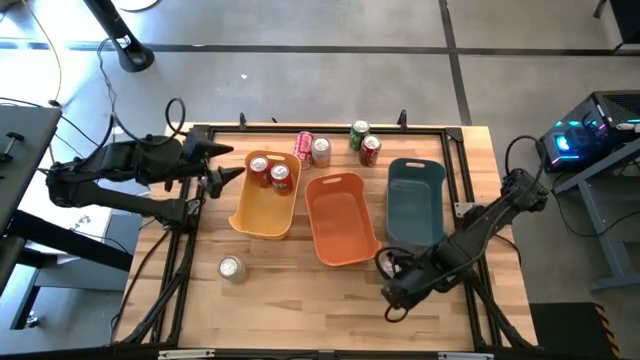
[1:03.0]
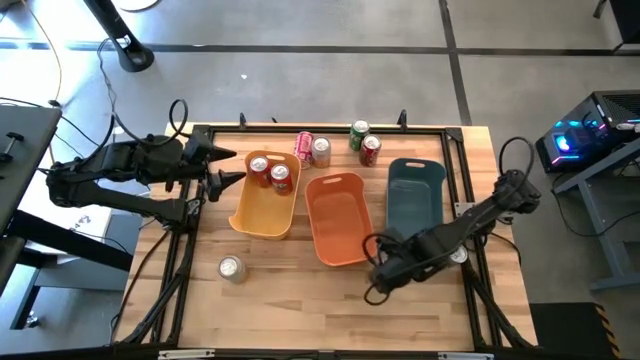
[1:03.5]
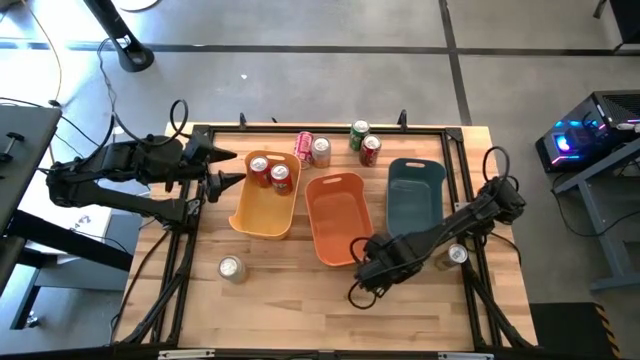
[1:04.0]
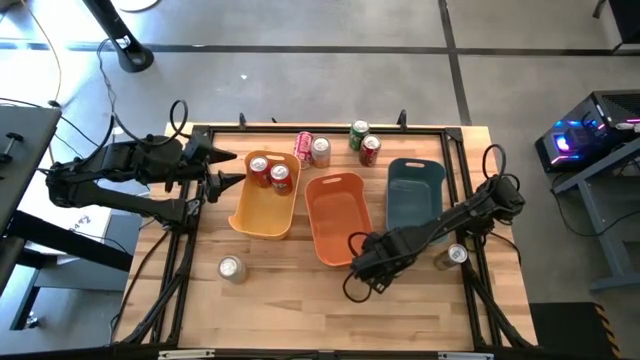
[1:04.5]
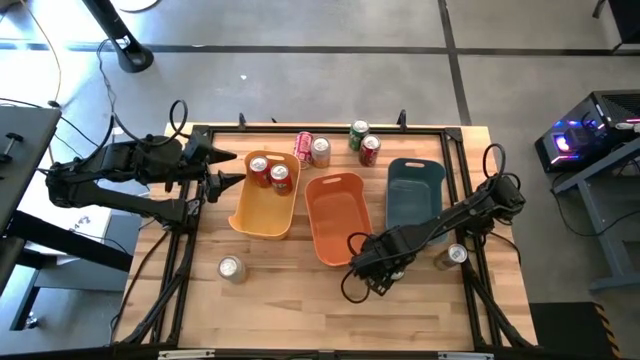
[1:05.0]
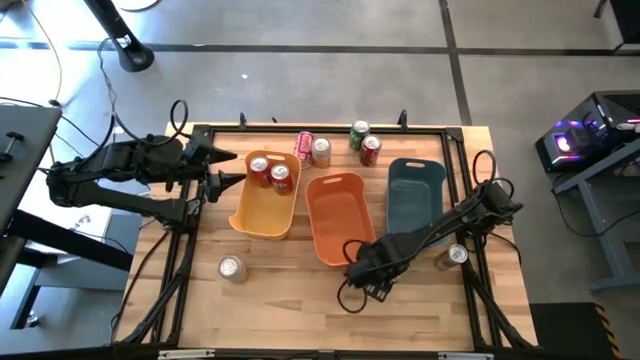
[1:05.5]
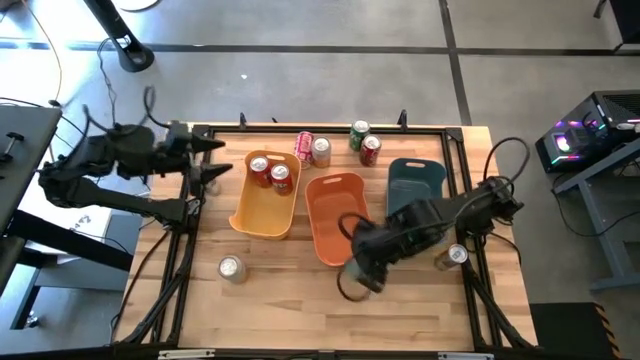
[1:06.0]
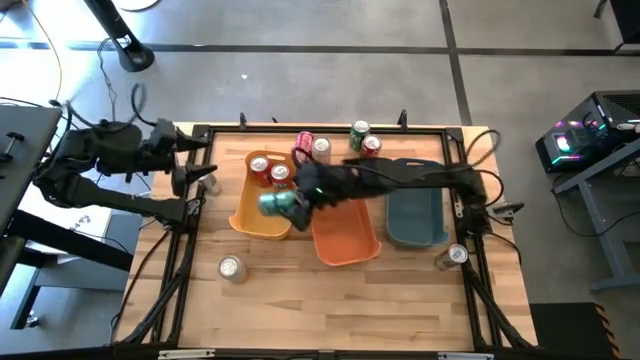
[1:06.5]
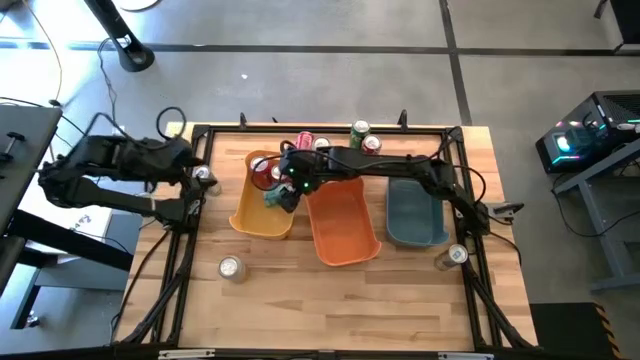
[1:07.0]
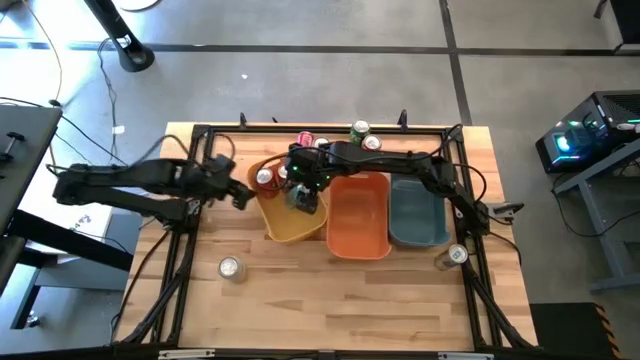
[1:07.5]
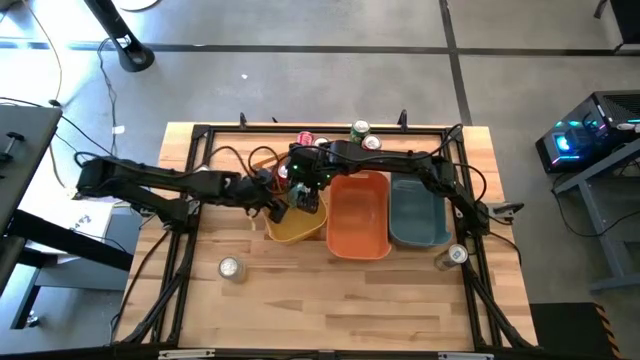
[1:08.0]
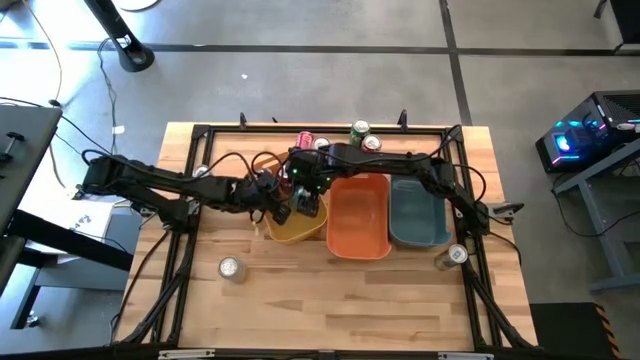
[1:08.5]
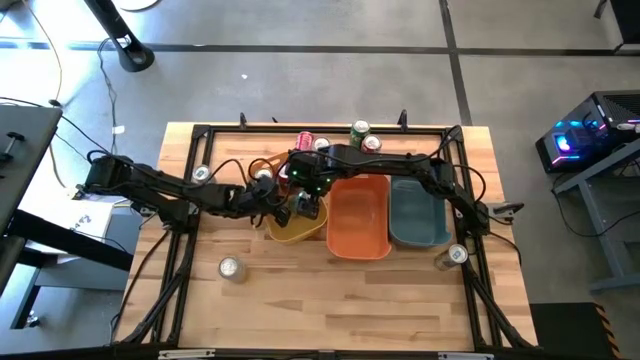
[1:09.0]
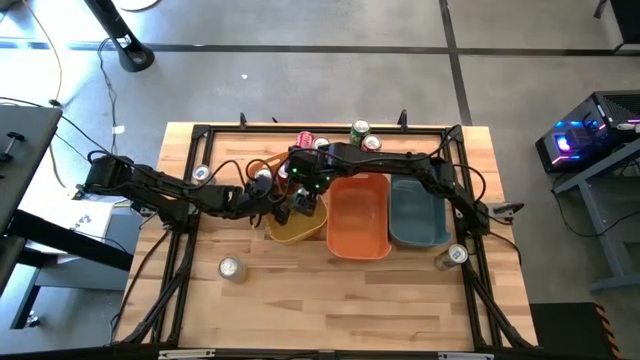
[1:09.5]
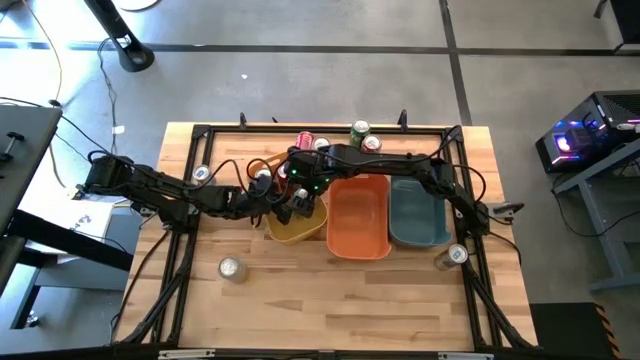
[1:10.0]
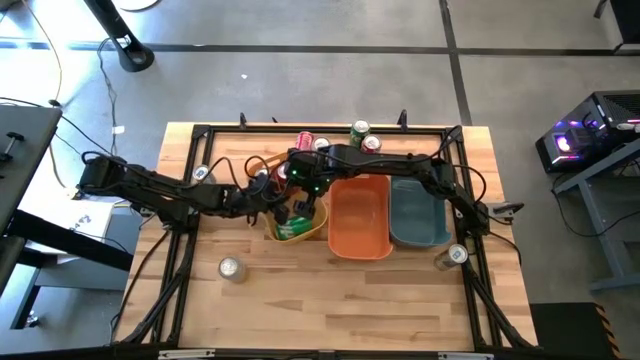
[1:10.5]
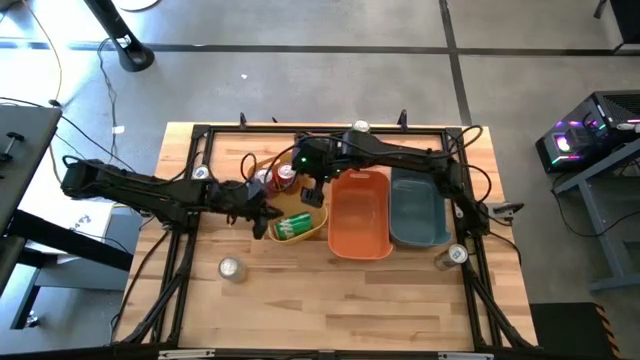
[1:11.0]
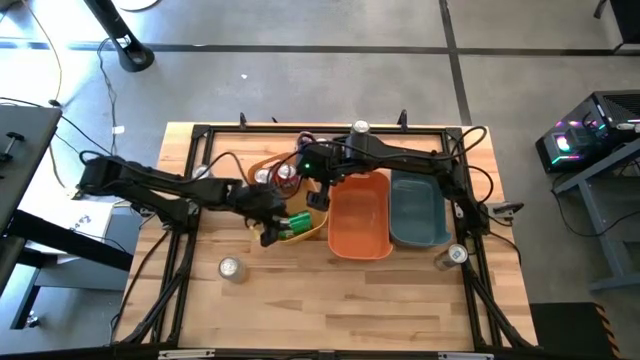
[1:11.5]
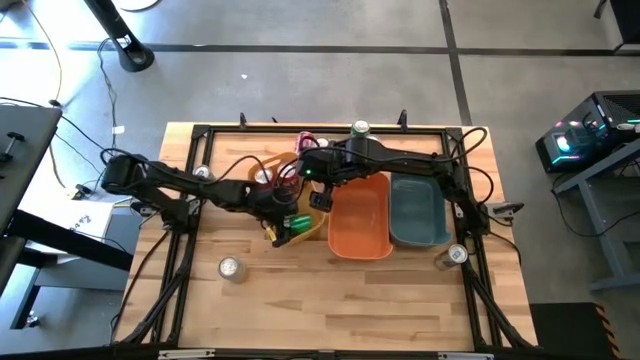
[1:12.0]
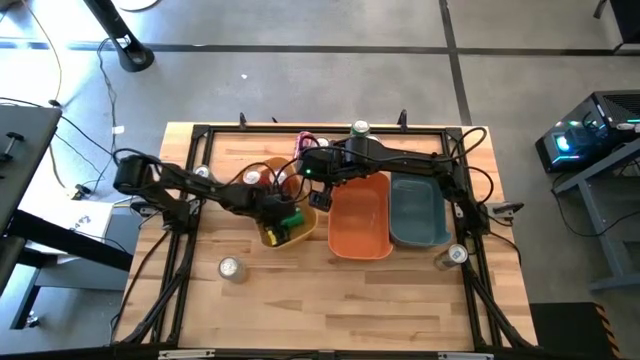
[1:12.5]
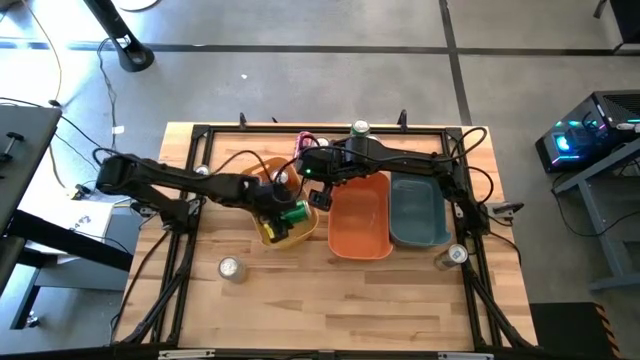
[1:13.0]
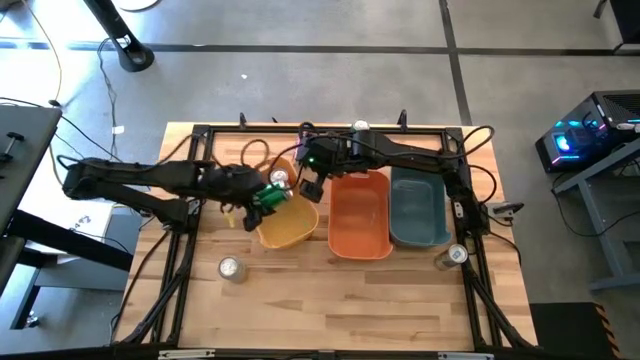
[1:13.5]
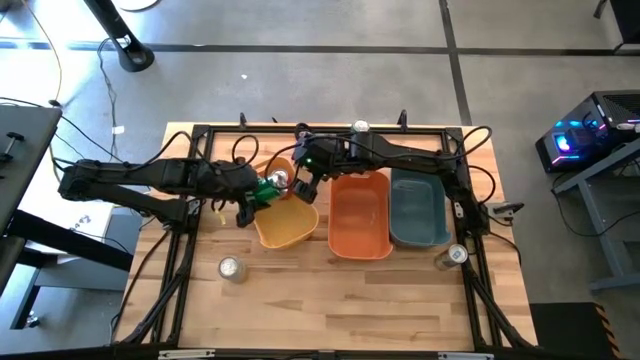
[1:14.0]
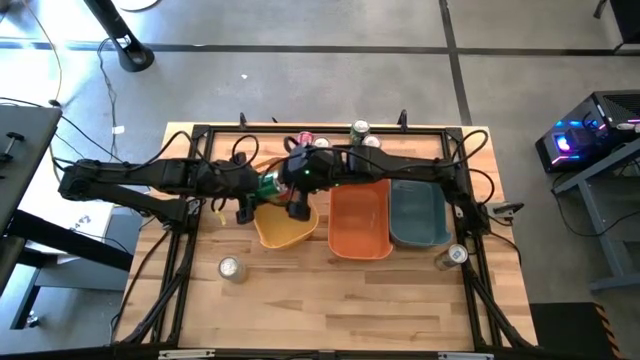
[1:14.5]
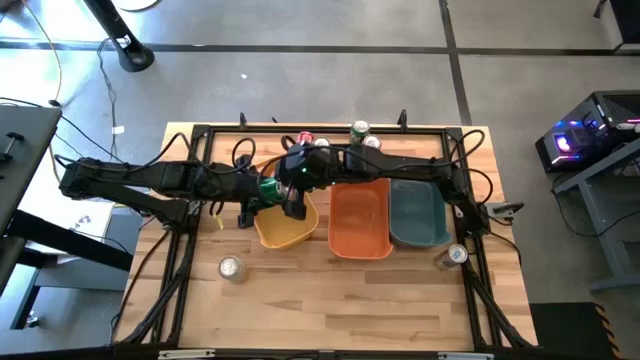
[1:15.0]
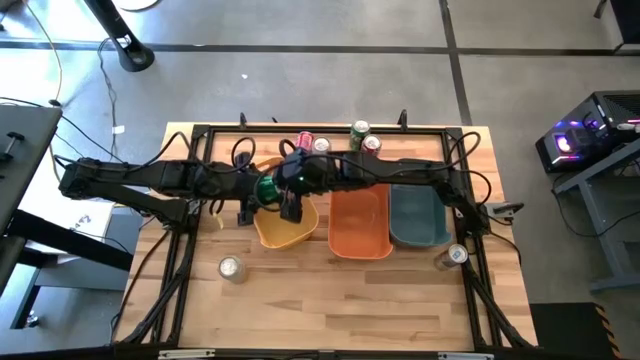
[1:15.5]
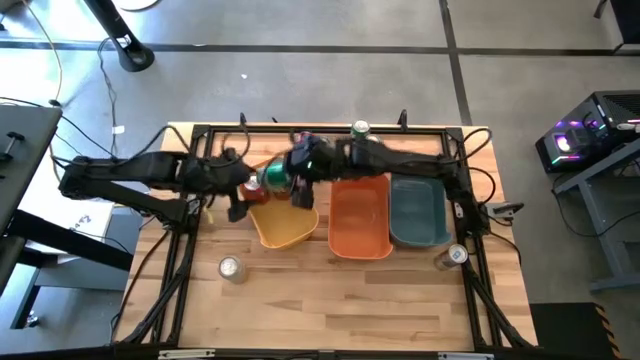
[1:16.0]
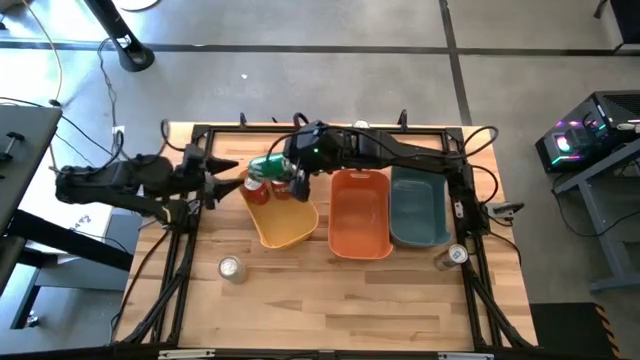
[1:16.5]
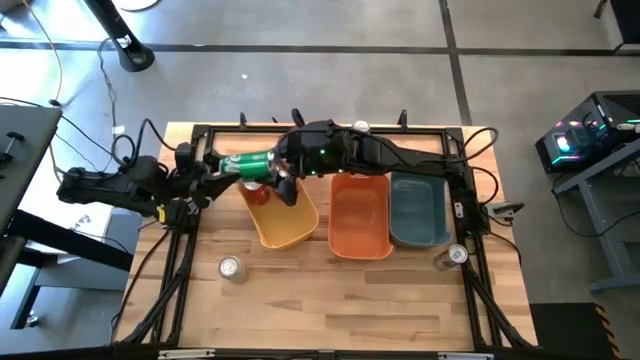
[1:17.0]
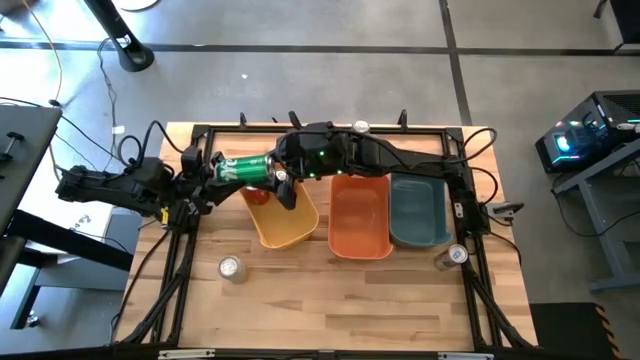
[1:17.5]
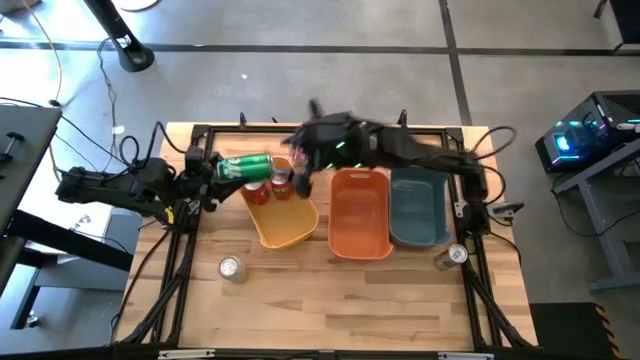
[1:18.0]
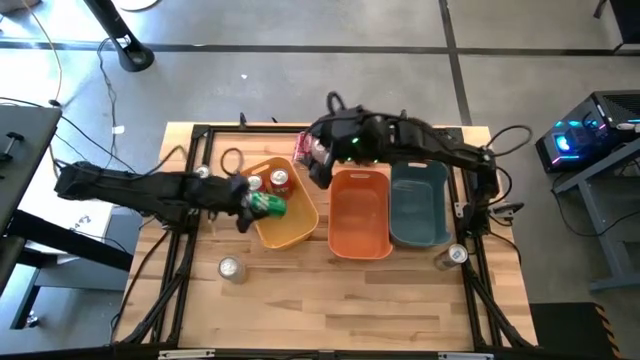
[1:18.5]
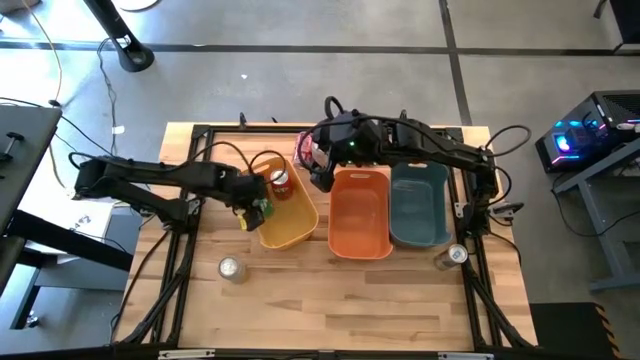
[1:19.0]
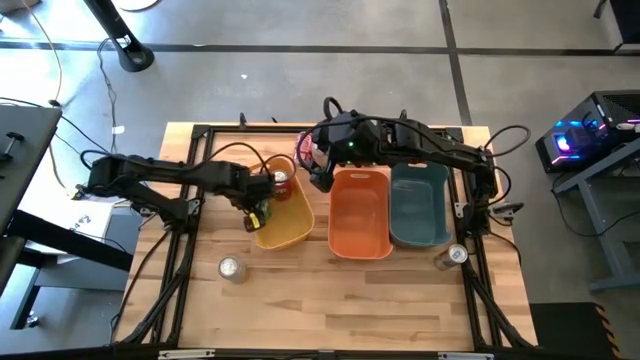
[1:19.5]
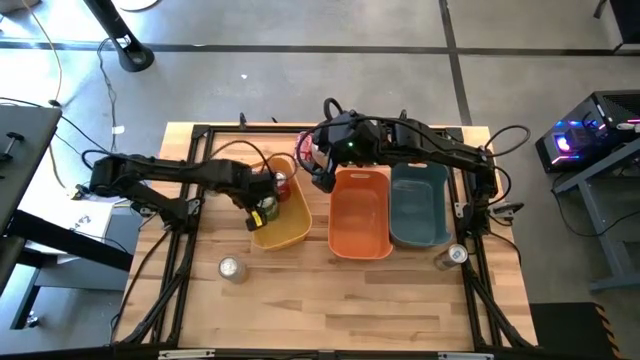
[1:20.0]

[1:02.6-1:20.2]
Task: Sort soda cans
Put the bottom green soda can into the yellow bin

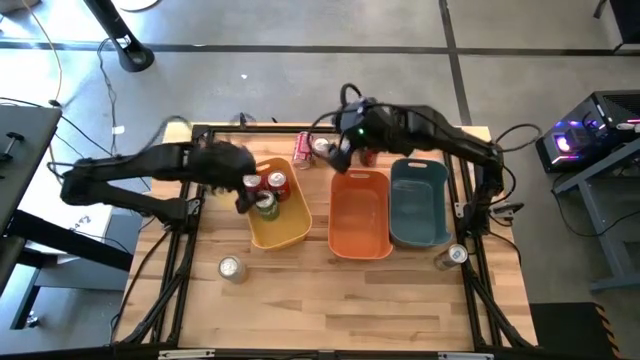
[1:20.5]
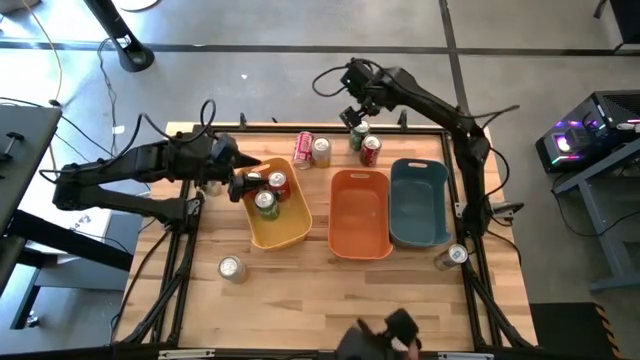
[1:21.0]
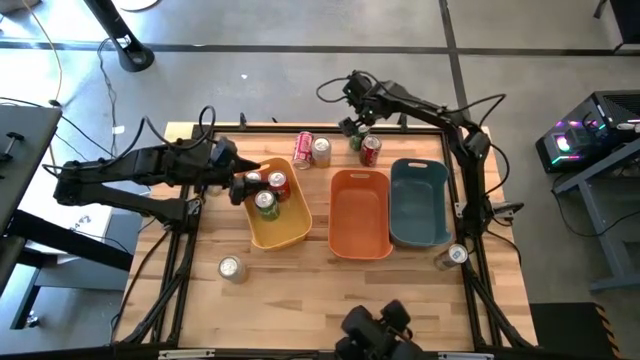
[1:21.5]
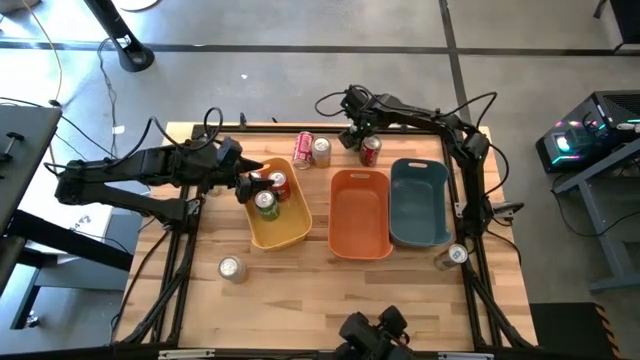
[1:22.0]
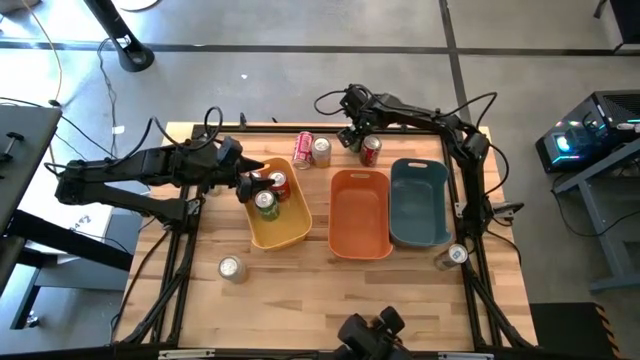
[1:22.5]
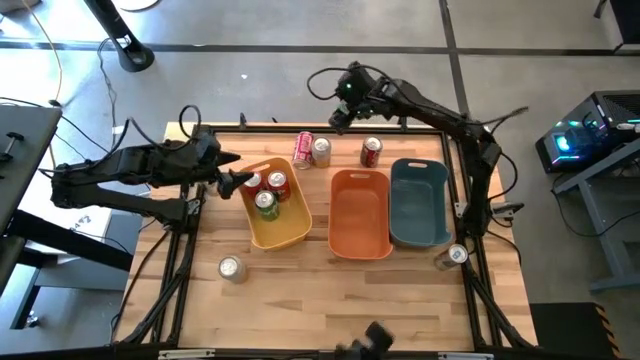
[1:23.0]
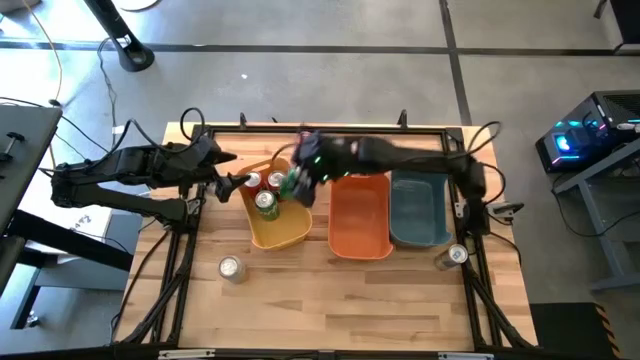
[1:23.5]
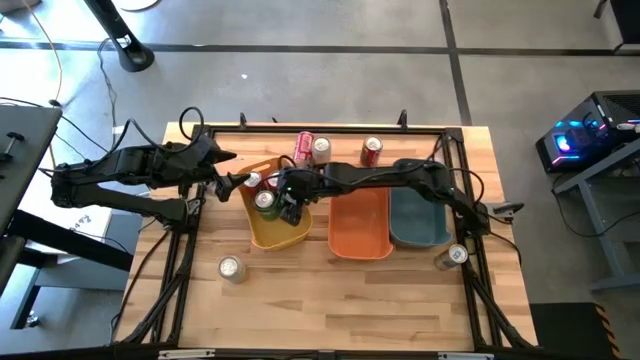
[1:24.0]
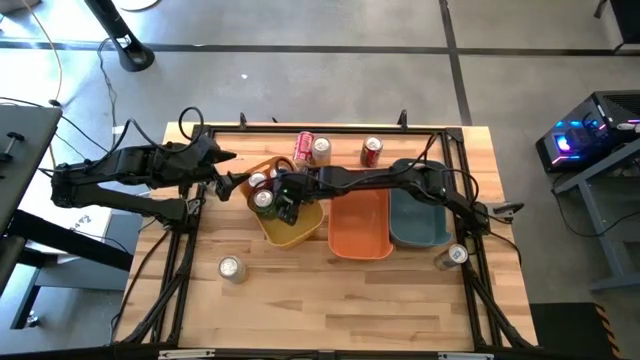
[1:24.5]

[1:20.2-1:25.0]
Put the green soda can into the yellow bin
